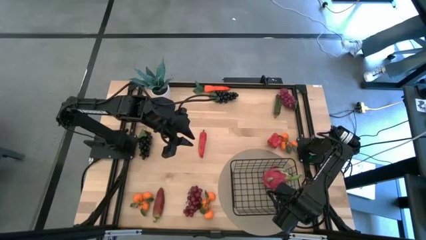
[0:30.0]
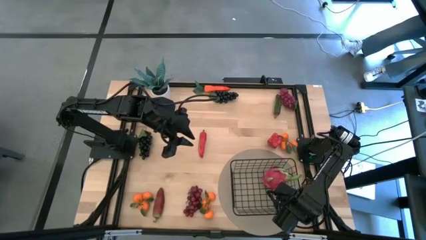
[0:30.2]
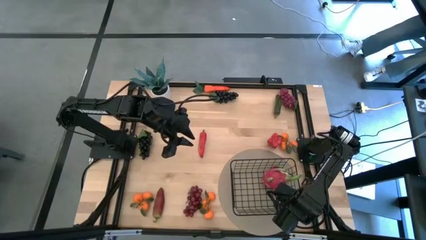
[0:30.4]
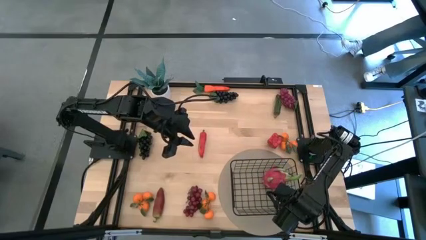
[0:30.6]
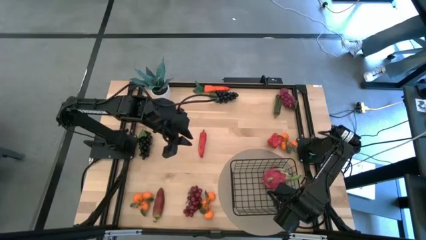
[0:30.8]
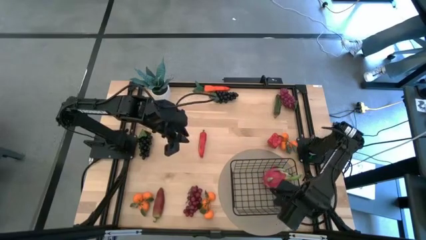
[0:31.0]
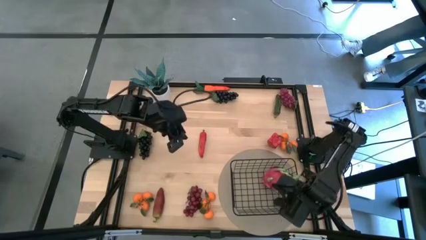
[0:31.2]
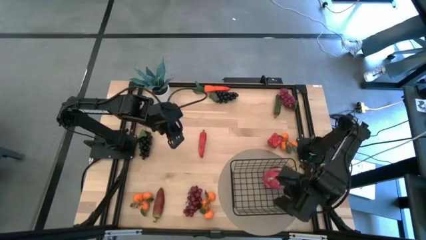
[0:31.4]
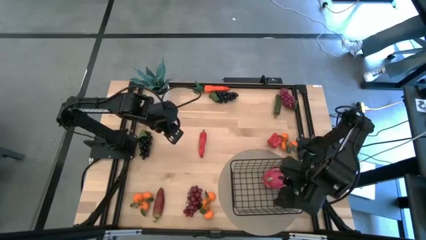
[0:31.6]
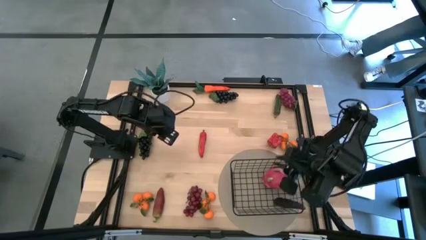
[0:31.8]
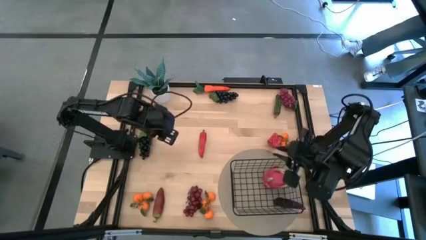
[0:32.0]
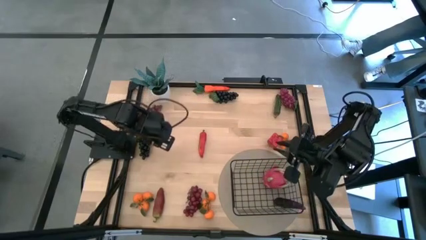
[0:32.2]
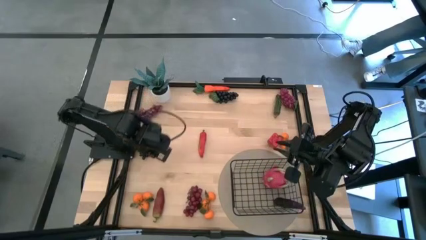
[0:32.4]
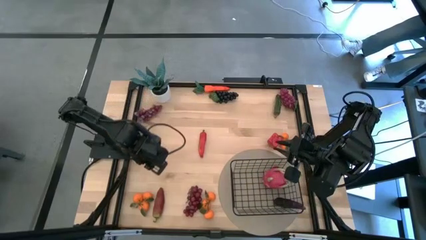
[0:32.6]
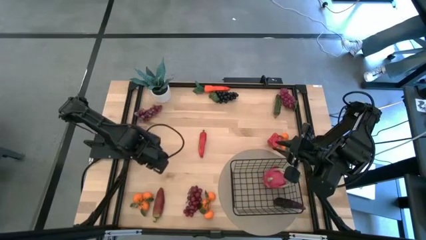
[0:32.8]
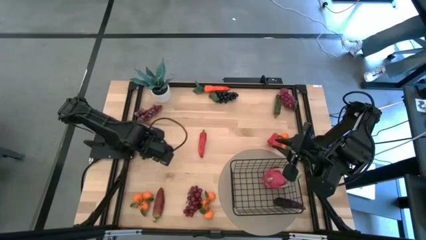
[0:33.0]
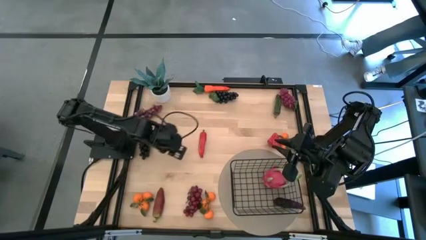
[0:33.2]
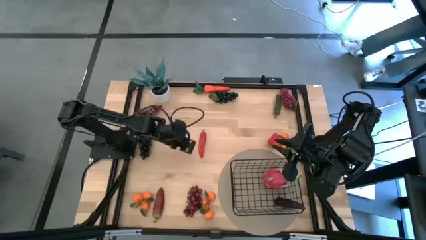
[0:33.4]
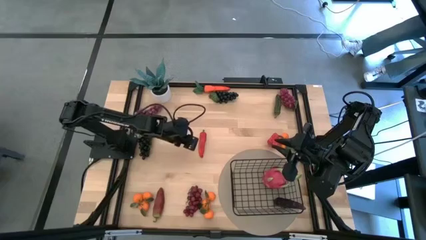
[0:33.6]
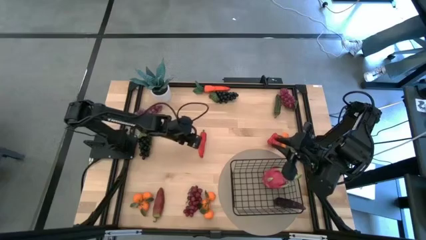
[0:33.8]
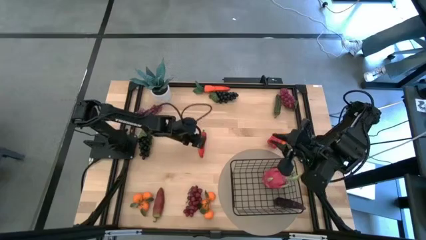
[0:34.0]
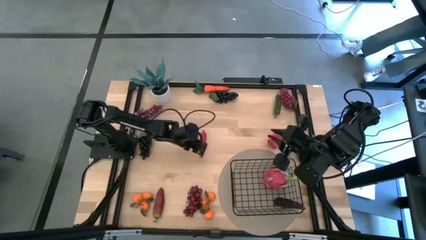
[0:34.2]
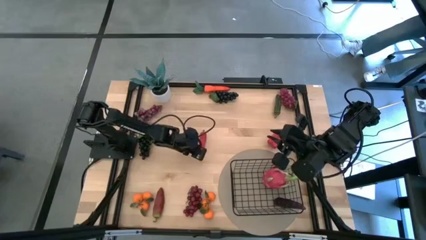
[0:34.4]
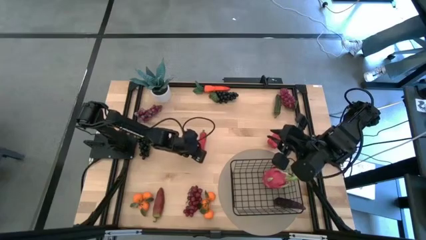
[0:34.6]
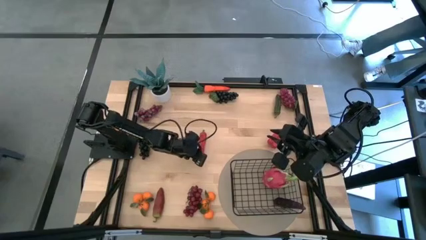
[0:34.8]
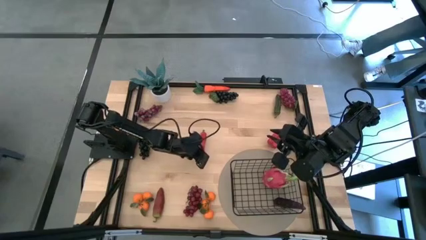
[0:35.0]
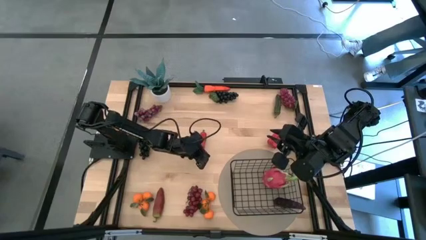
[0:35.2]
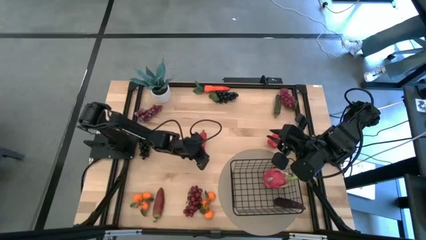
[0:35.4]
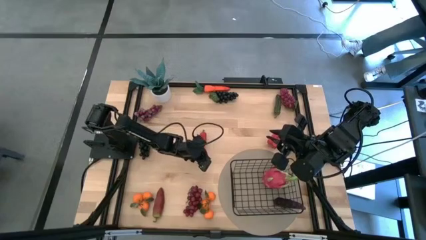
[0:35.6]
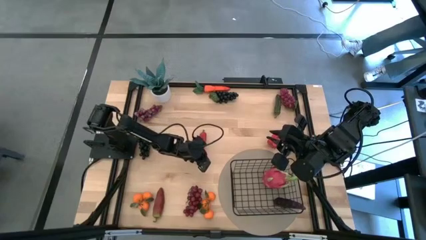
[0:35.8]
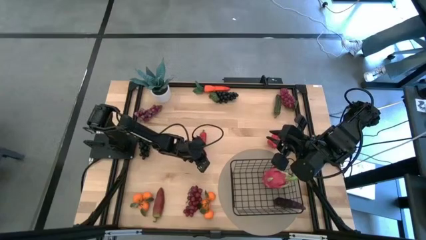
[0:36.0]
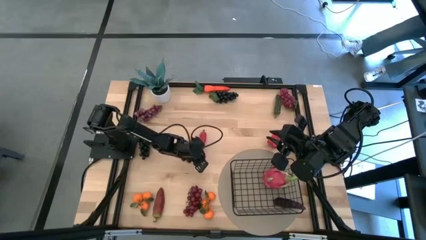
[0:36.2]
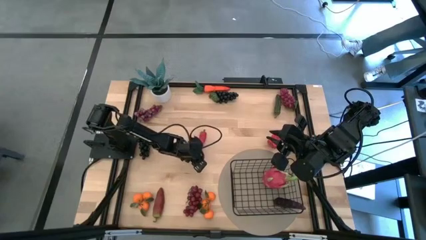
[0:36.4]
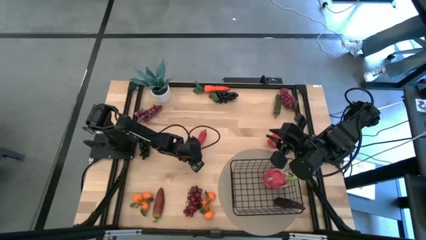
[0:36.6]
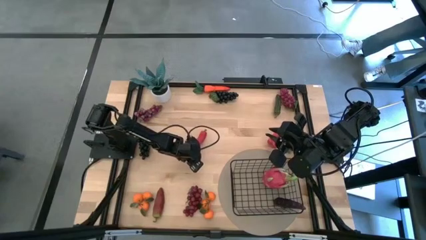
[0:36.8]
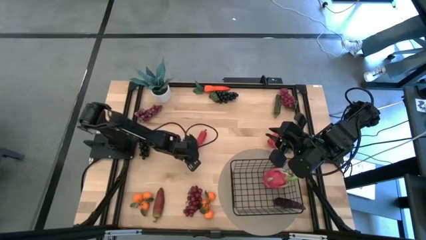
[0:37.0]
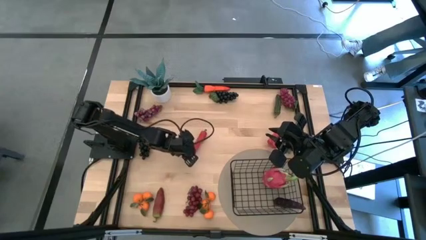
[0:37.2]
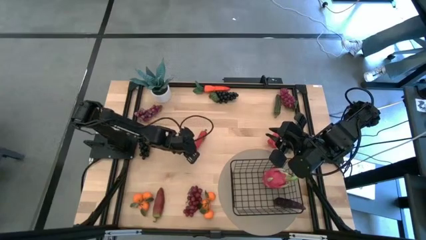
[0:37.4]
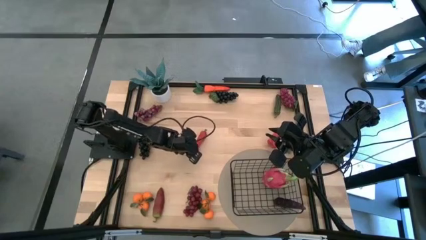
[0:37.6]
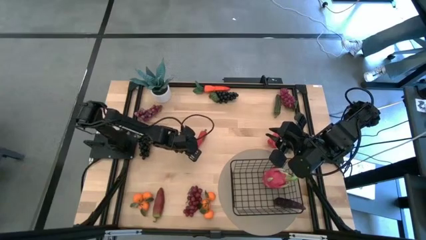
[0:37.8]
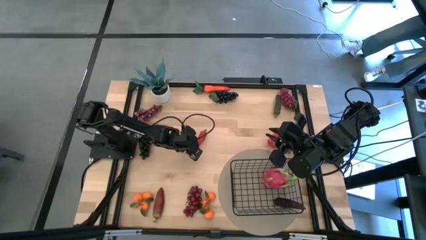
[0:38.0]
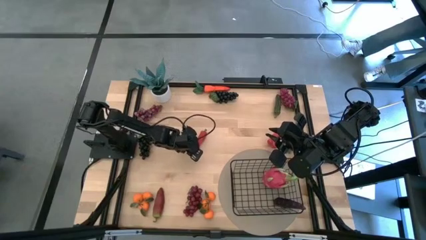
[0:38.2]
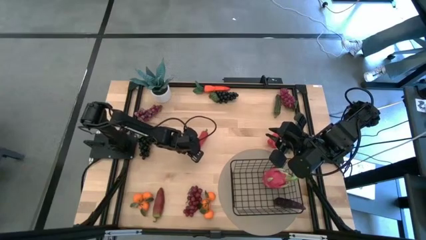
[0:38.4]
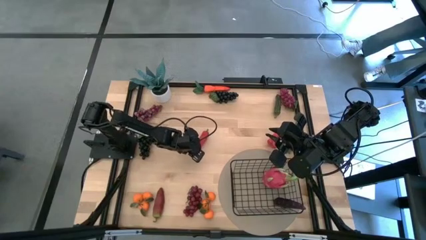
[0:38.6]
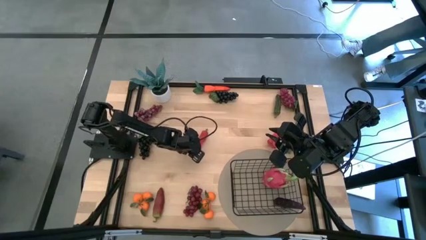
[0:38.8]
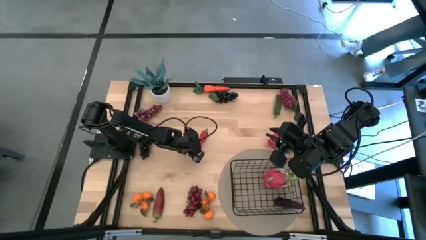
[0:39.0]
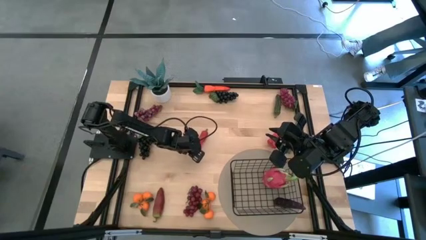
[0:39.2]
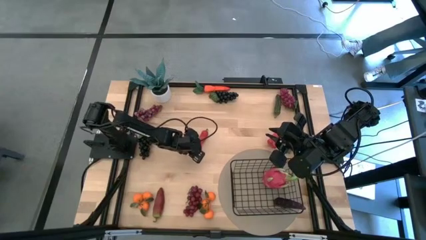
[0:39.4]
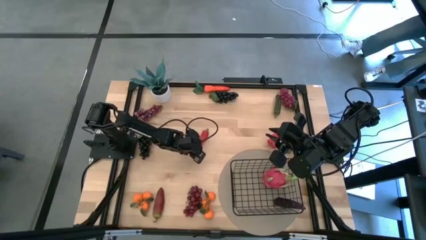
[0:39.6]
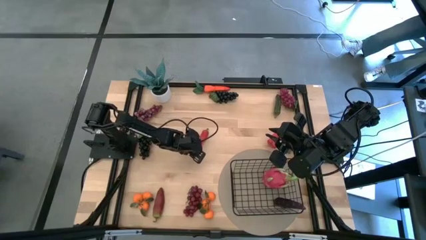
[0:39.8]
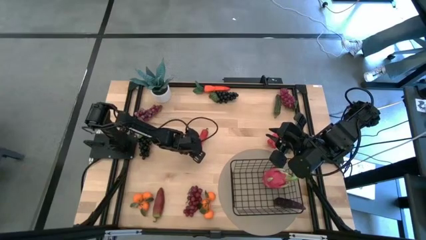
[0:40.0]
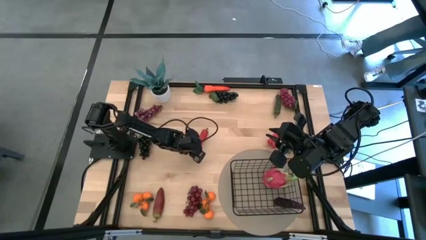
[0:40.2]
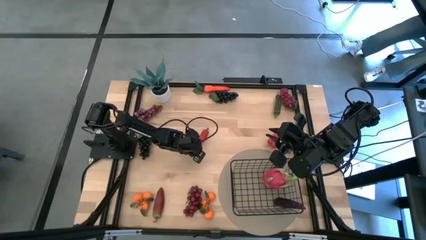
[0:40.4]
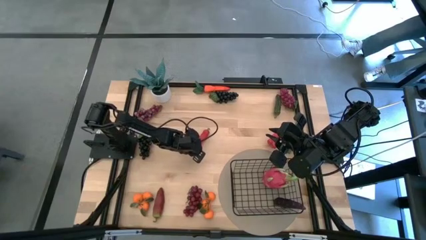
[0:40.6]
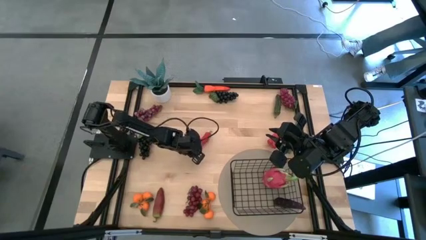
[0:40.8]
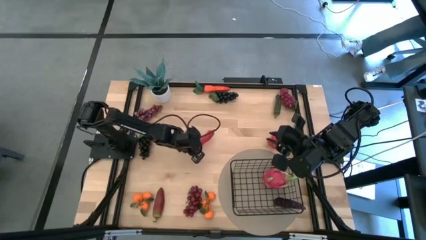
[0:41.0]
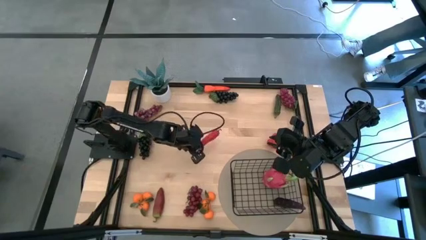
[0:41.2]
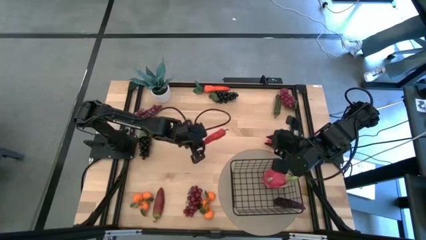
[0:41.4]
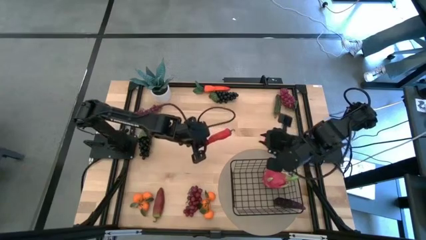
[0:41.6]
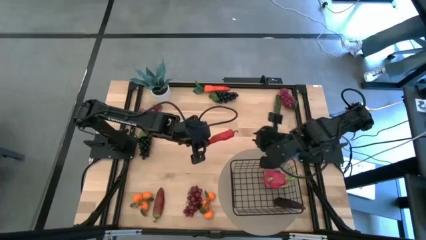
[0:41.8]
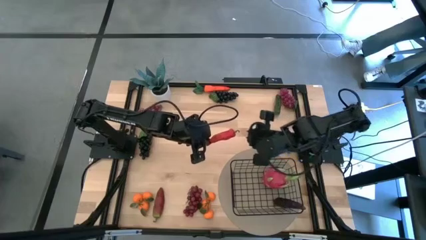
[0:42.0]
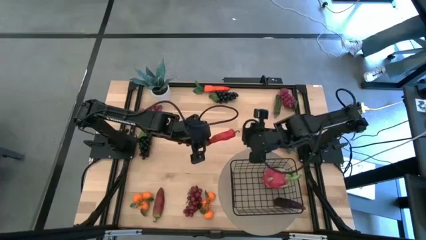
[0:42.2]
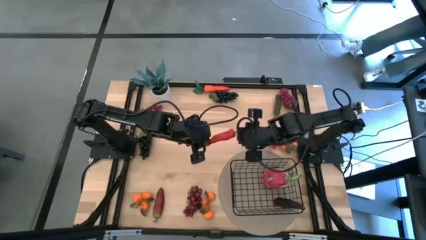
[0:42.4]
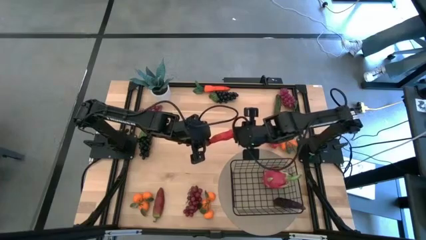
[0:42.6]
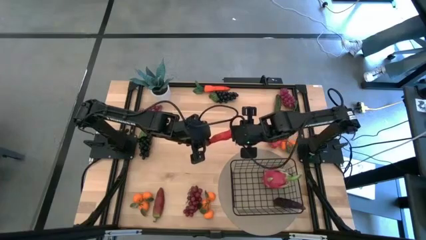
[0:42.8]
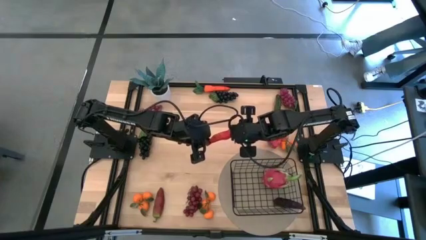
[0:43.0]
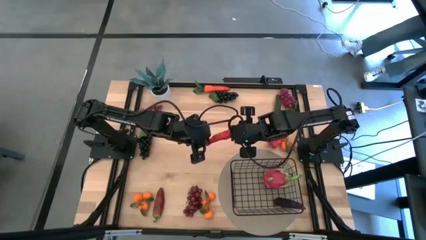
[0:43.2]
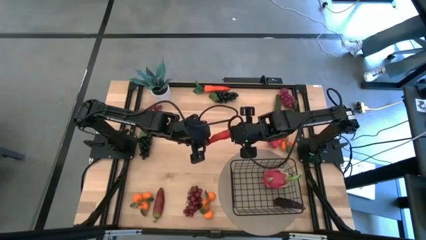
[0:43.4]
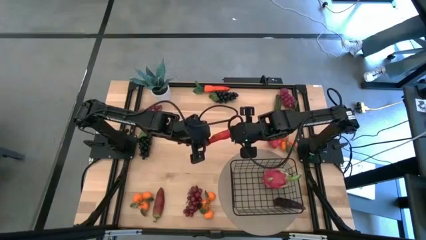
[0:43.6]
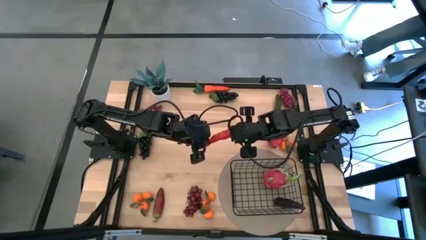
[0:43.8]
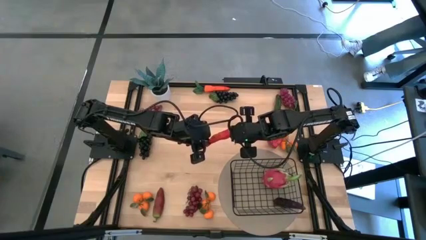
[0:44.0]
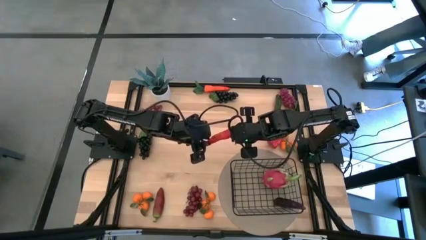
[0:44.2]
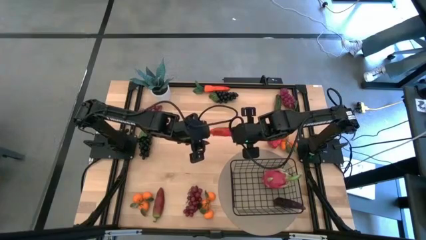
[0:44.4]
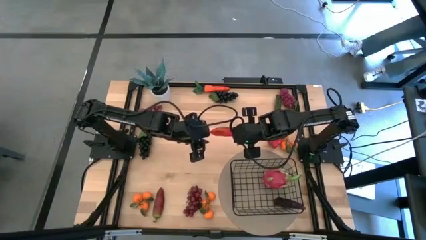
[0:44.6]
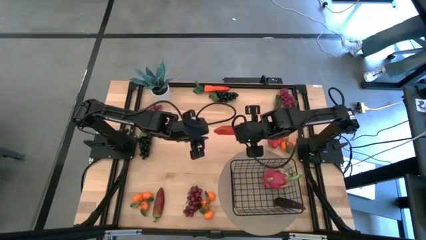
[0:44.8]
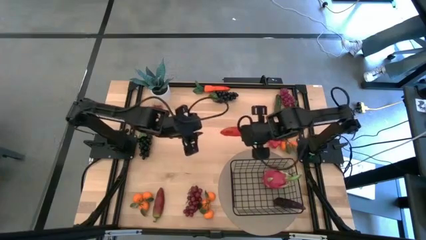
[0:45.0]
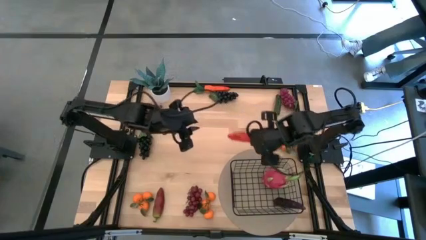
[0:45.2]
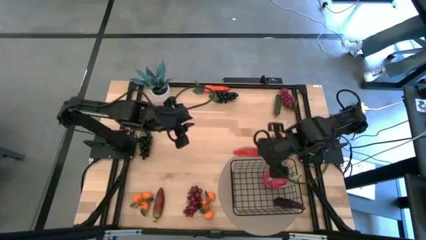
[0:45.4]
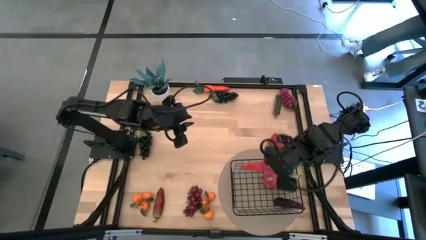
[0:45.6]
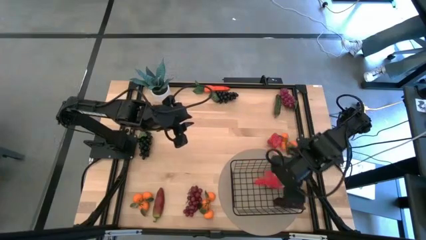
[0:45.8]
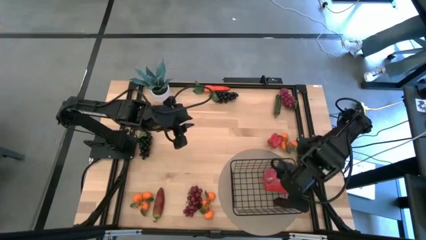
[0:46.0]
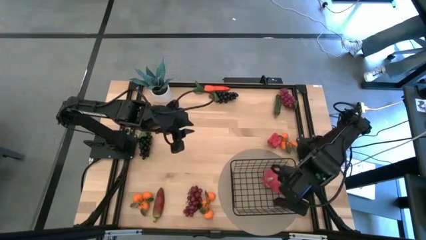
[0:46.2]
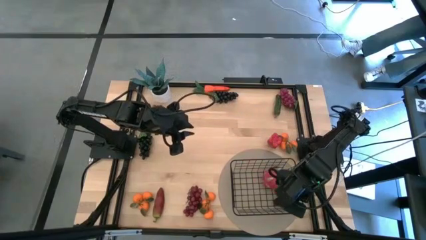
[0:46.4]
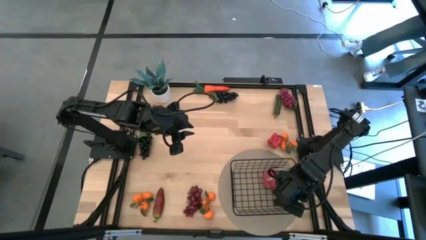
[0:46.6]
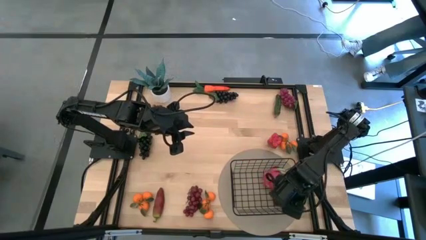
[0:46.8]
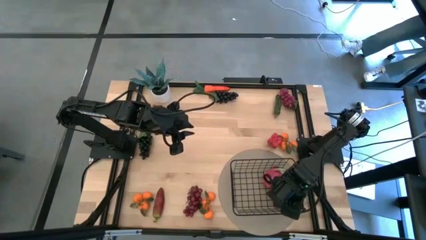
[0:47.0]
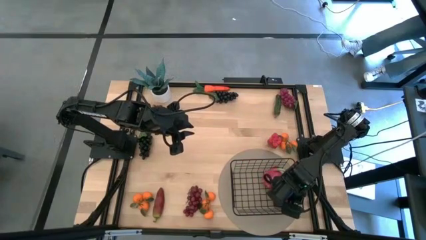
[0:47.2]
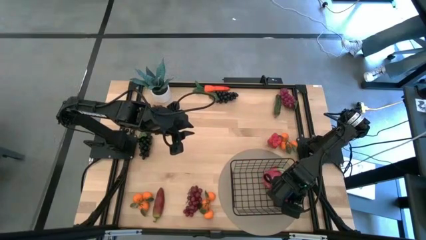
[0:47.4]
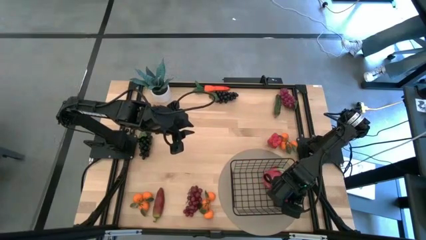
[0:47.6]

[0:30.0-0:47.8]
Task: Build produce basket
Put the center pepper into the wire basket
